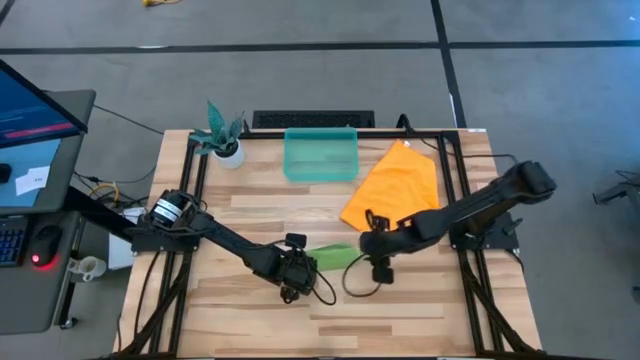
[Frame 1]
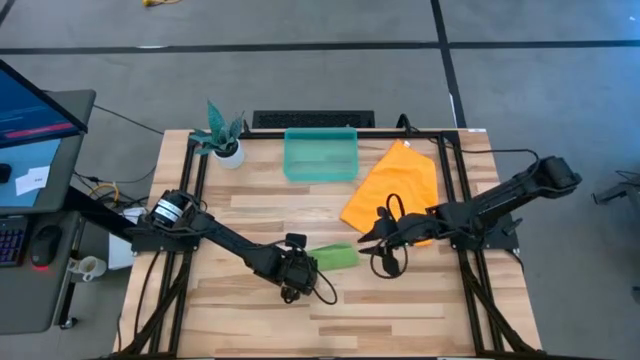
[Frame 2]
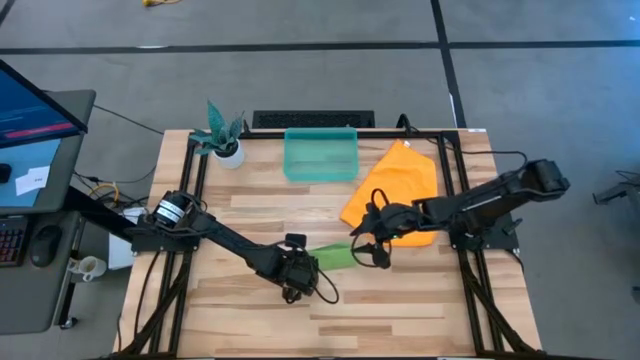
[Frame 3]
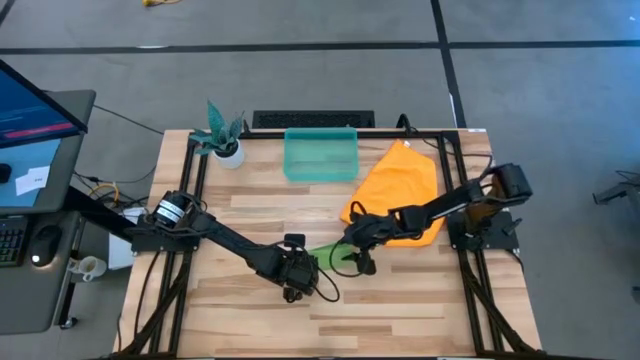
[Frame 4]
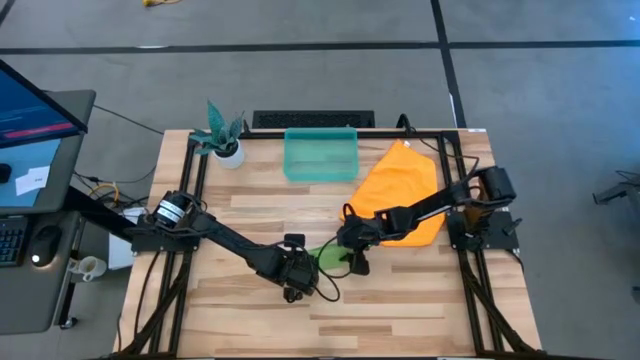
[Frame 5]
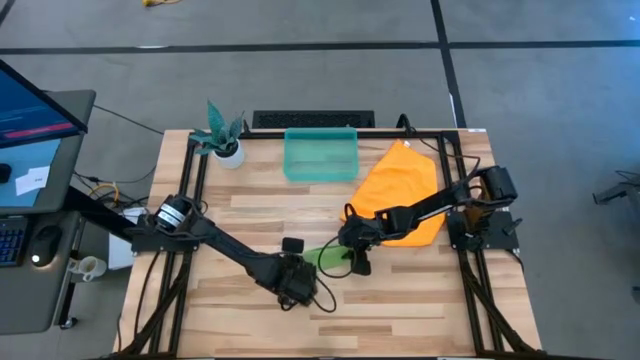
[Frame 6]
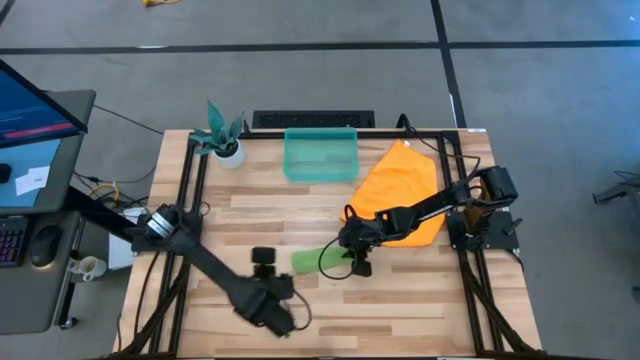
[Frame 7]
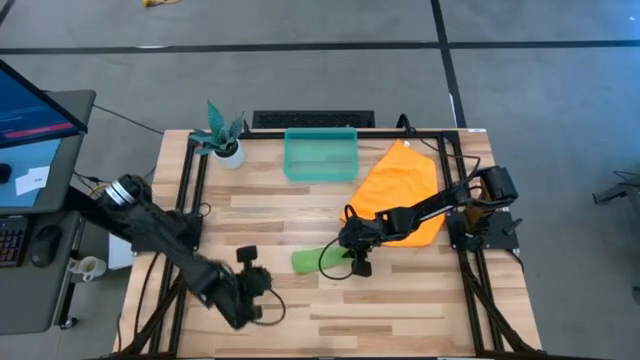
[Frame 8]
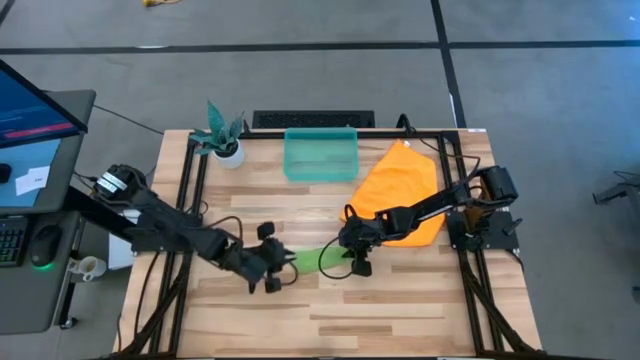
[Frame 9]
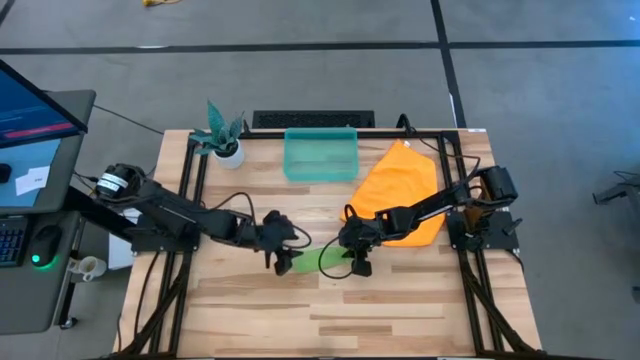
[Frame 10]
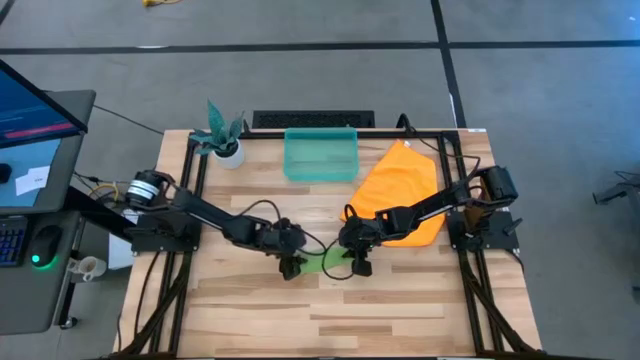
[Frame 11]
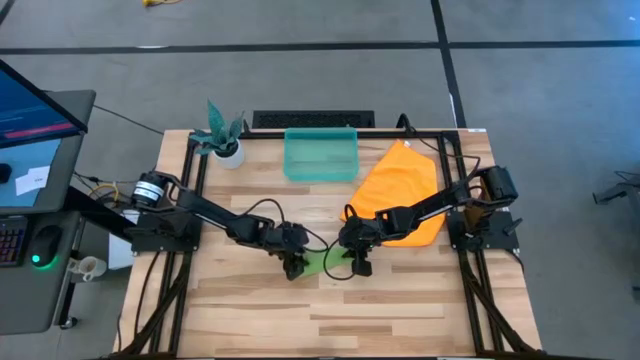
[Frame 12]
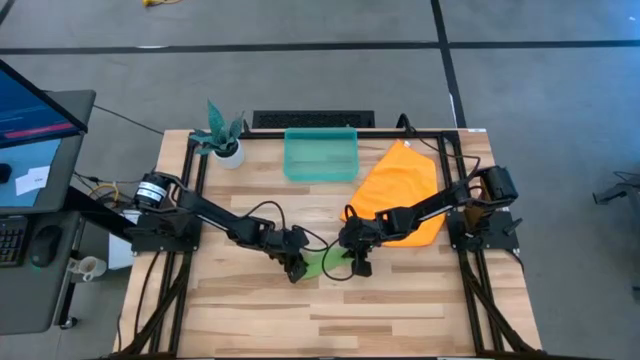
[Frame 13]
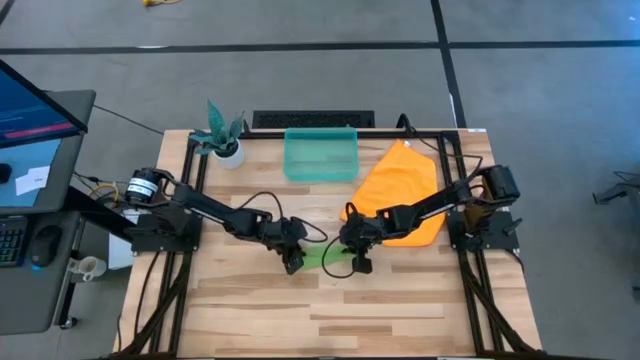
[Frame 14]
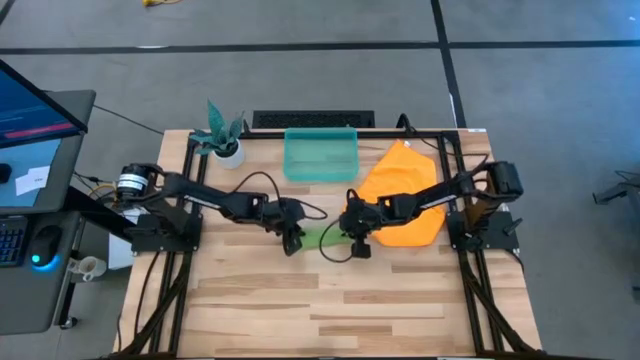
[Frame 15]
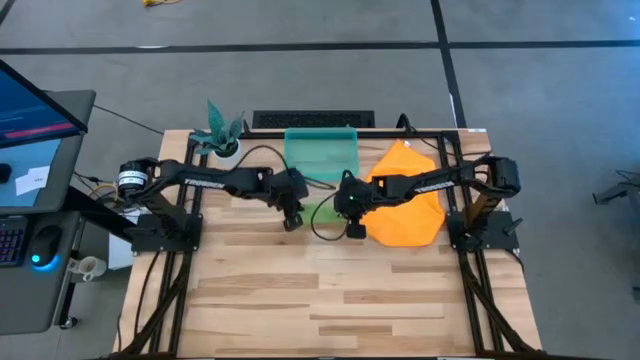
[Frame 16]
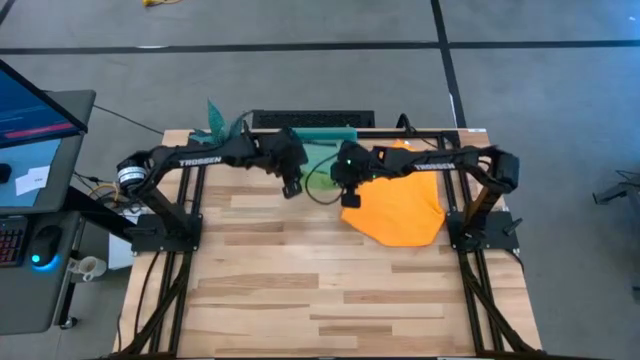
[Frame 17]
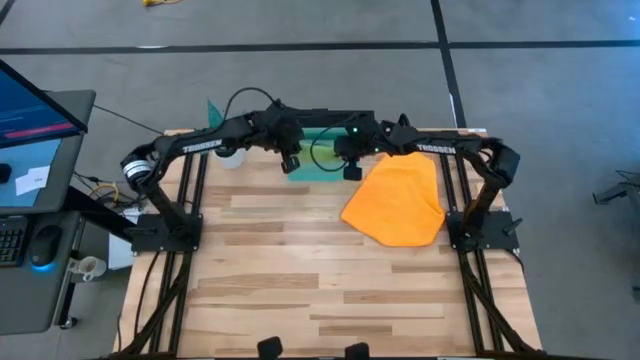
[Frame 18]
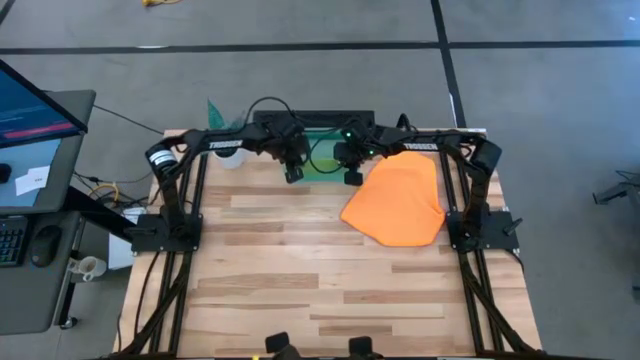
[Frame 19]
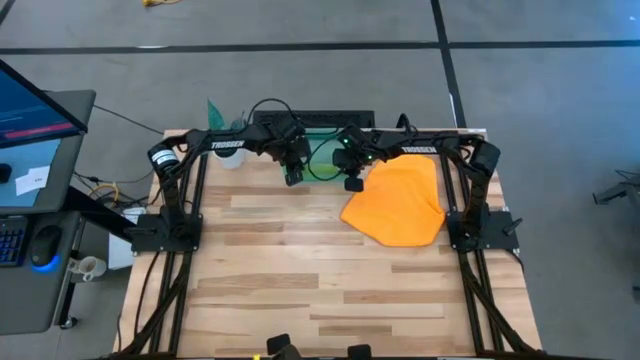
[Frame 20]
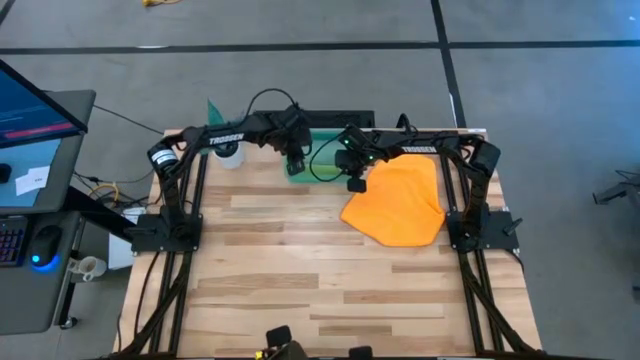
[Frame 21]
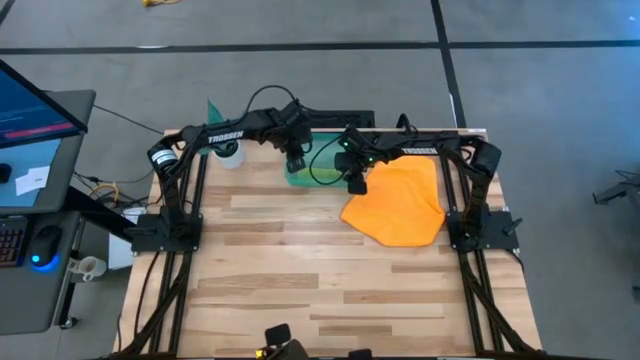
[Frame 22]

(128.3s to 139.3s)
Task: Roll microfiber towels into tight, uniform cylinder then place into a basket
Put the rolled green towel into the blue bin

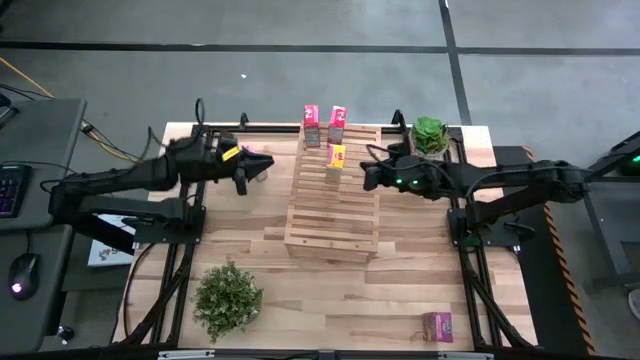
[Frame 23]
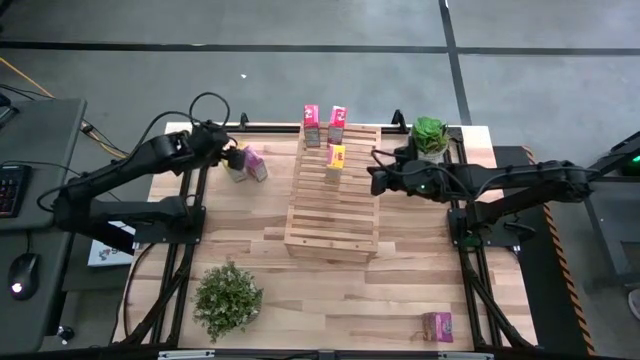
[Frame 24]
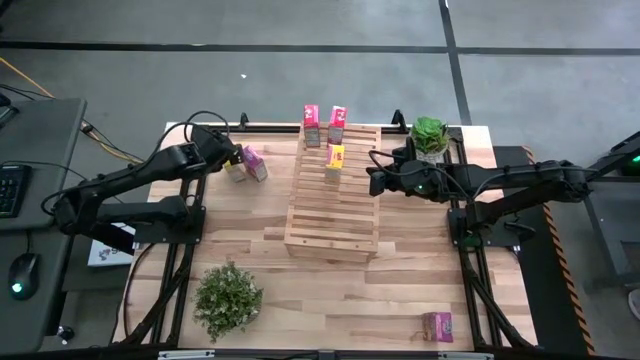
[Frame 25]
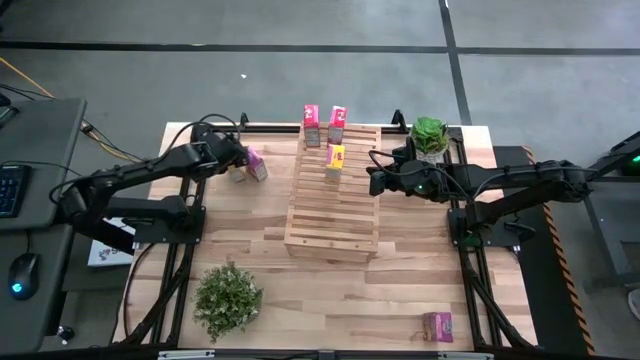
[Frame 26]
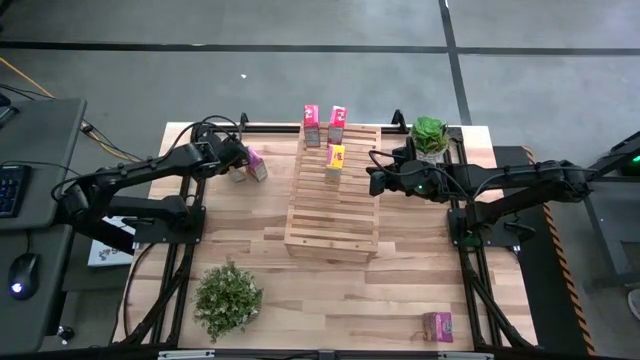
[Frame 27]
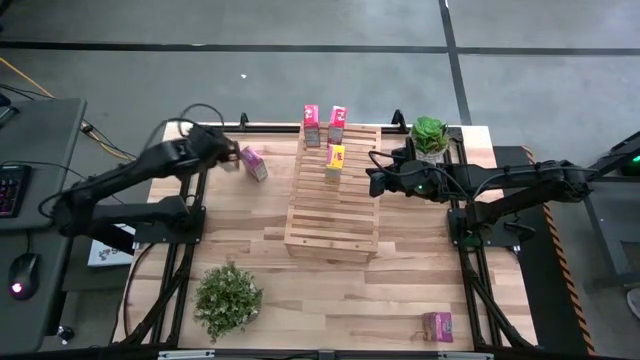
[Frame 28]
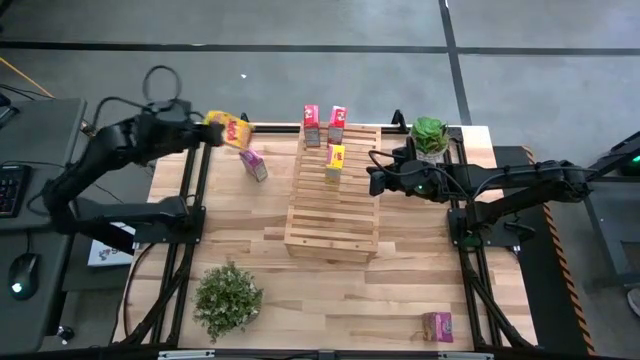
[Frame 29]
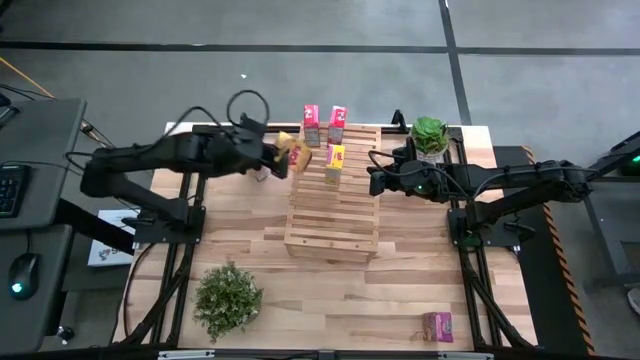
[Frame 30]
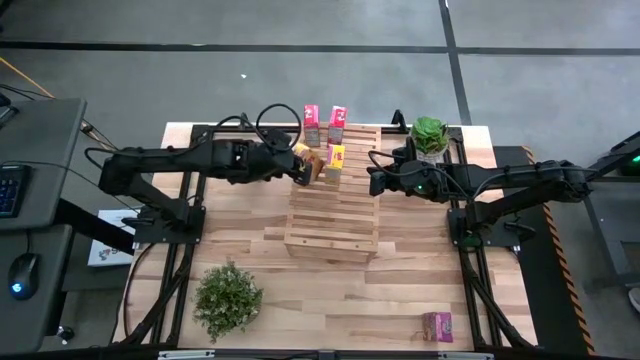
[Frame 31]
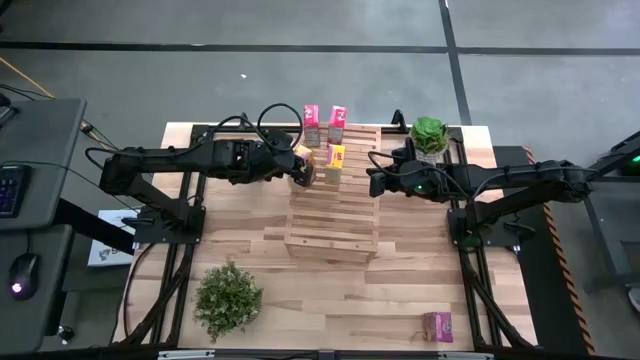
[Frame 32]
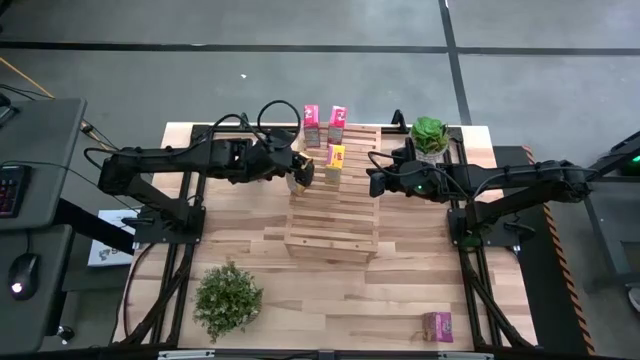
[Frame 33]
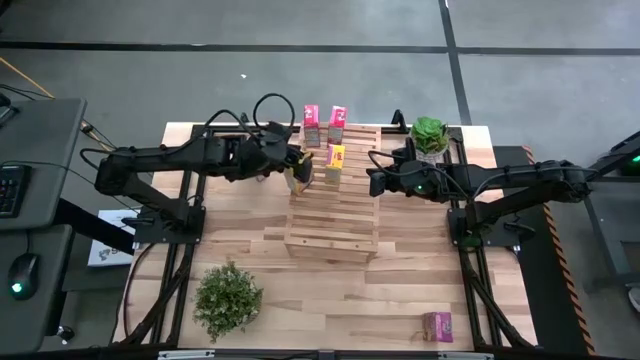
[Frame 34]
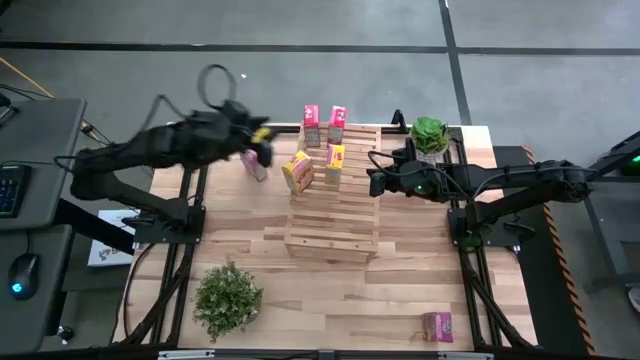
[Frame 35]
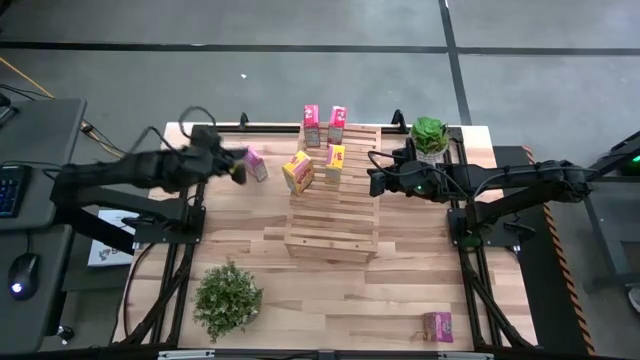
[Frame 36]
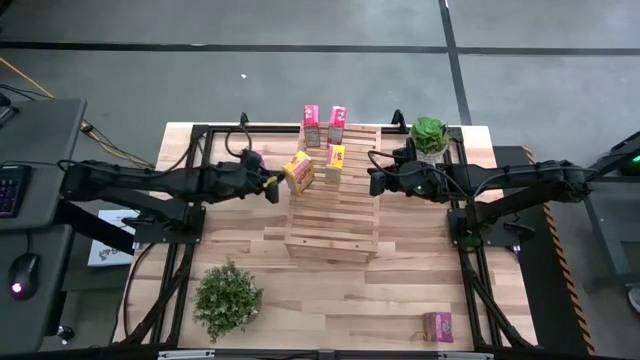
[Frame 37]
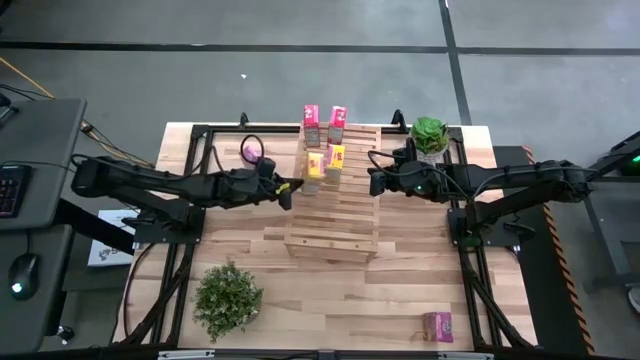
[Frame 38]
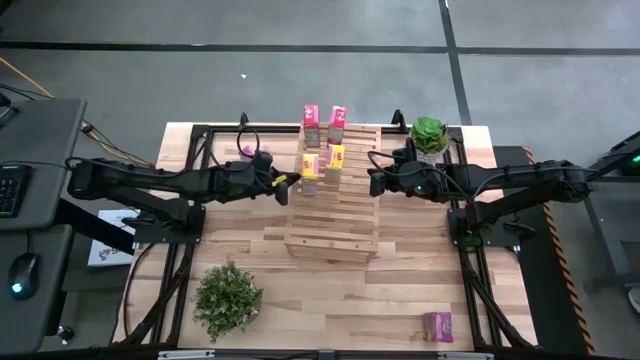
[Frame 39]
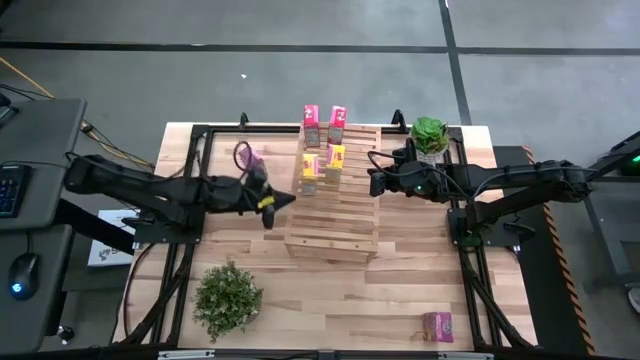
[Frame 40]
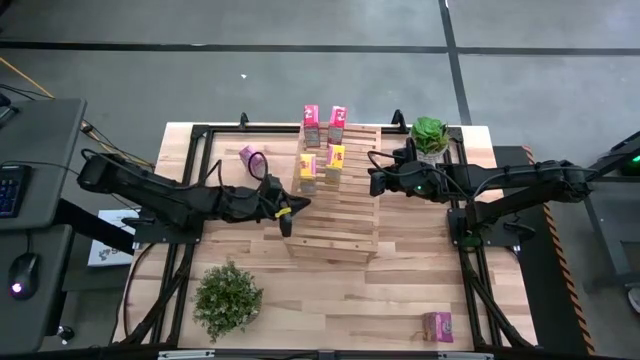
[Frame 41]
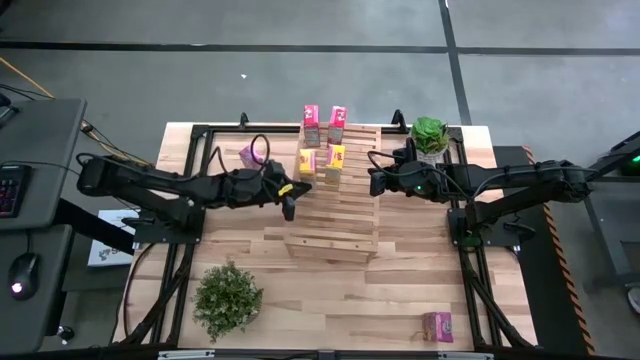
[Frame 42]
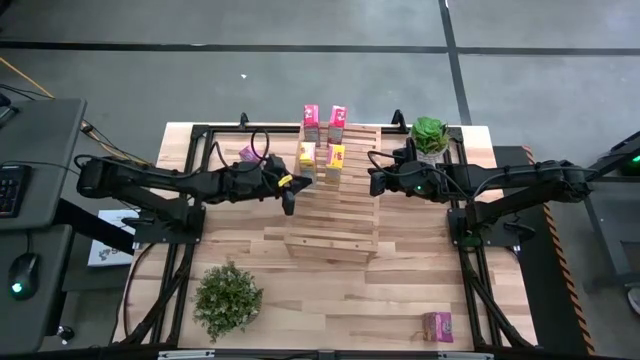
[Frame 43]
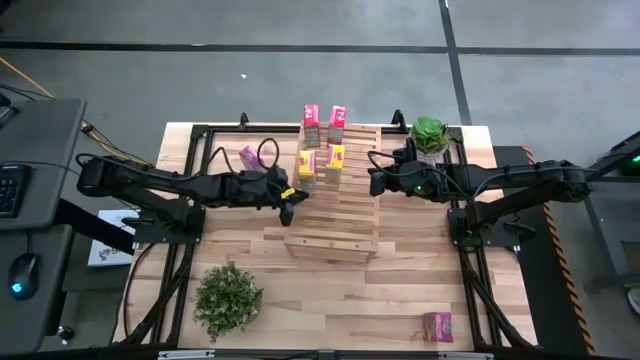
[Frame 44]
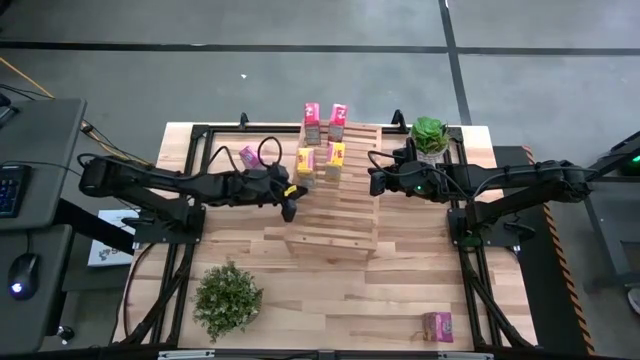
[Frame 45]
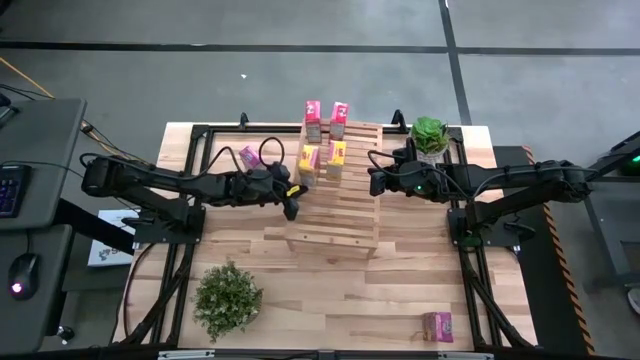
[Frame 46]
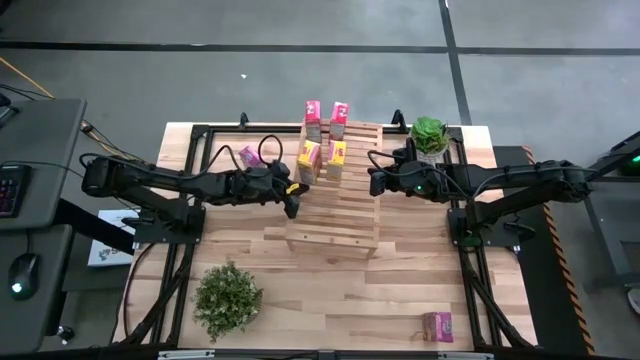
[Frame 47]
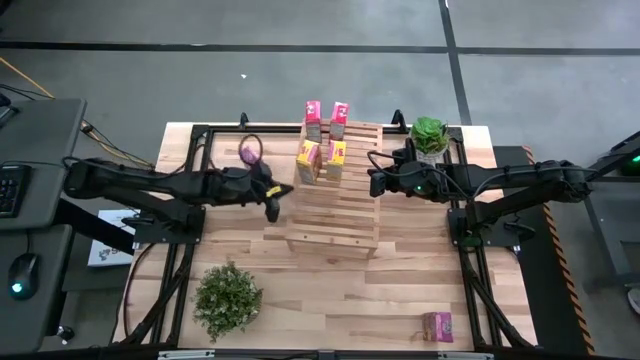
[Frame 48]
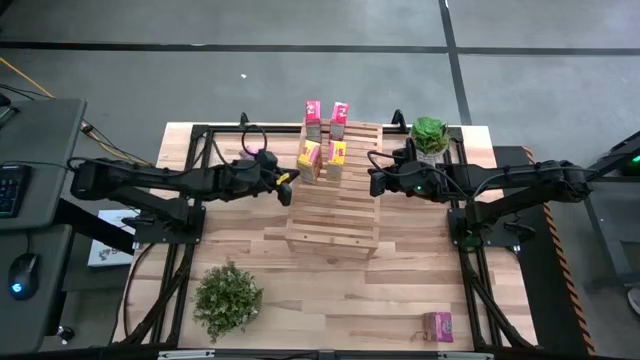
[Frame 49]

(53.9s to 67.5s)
Task: Stack cereal on shelf
Put the yellow cereal box on the shelf aligned with the yellow cereal box
